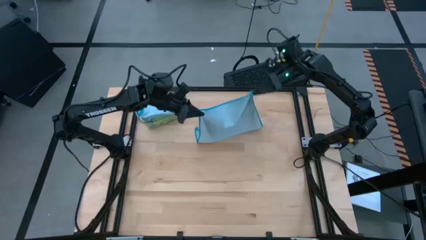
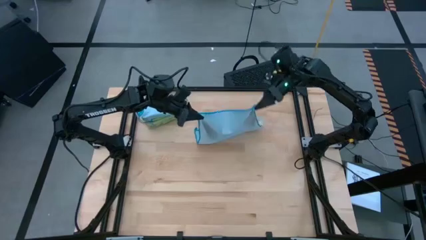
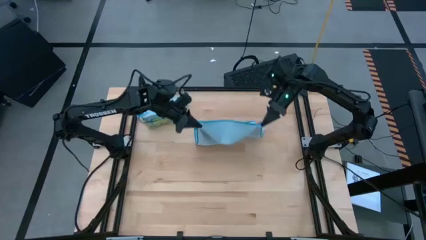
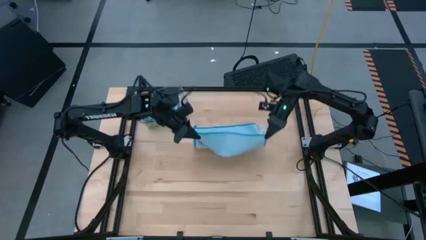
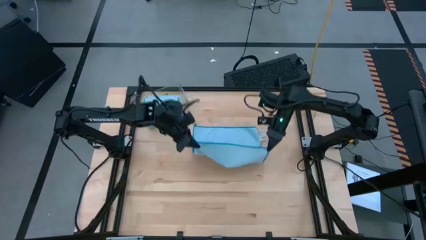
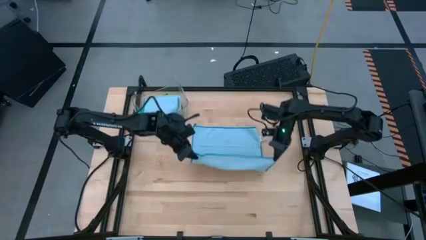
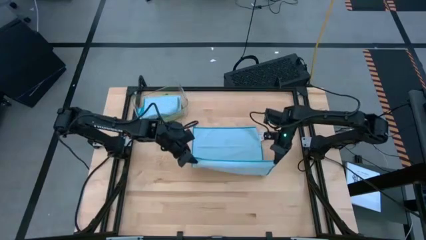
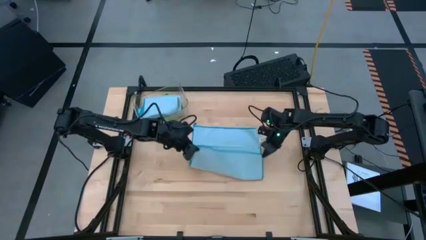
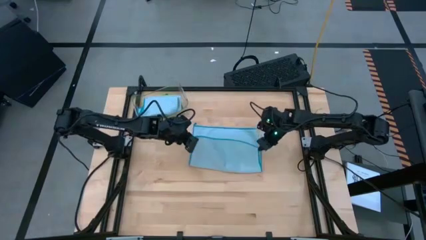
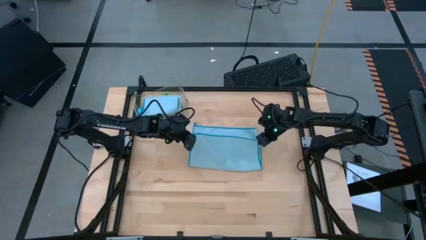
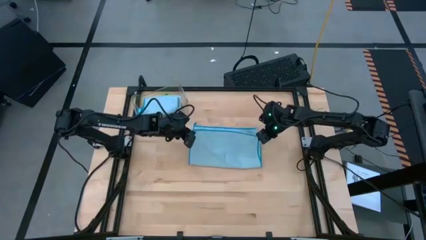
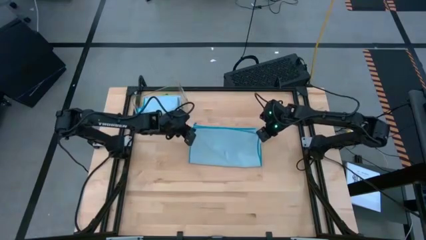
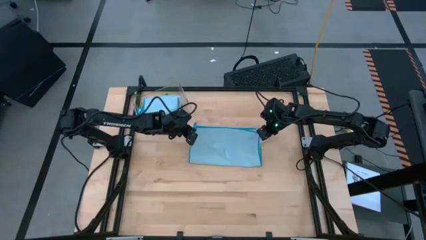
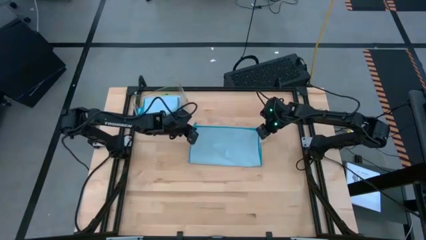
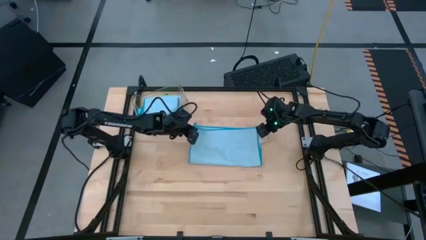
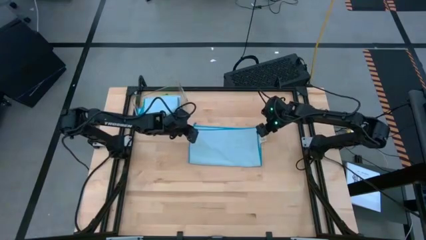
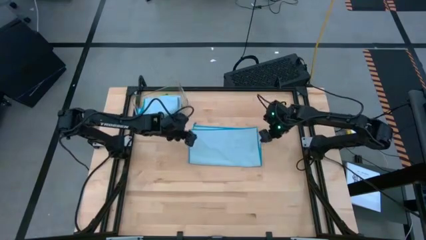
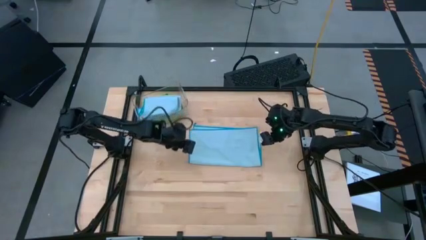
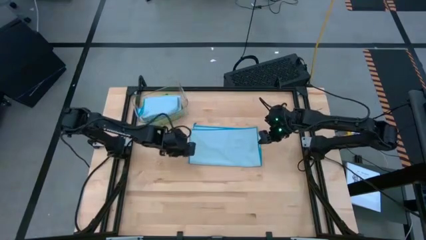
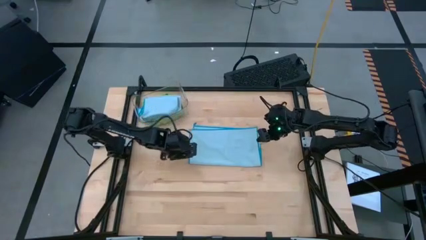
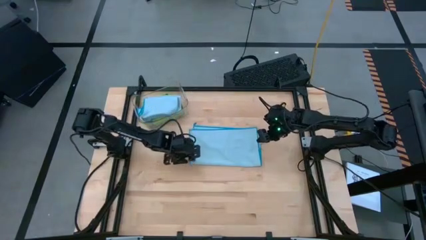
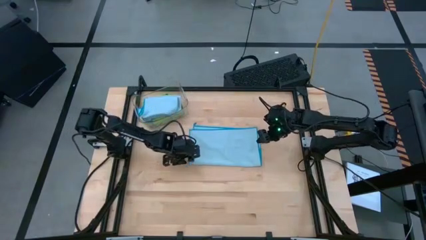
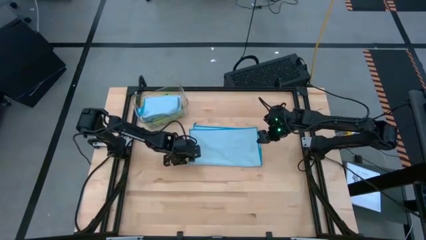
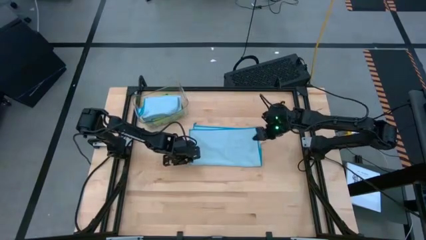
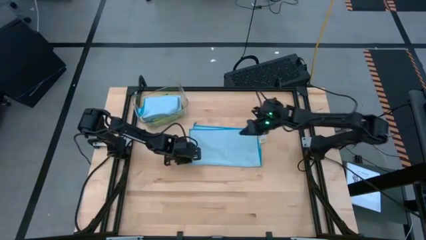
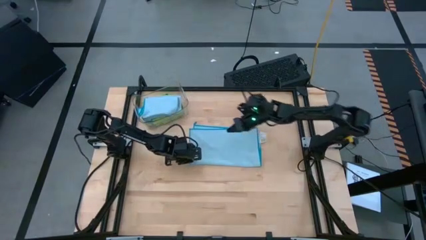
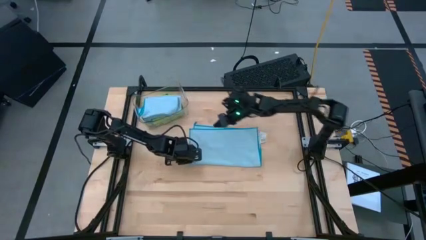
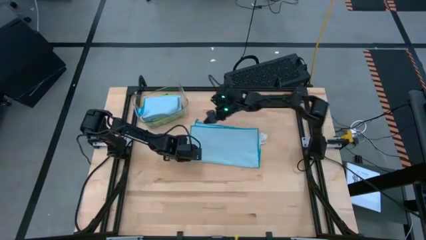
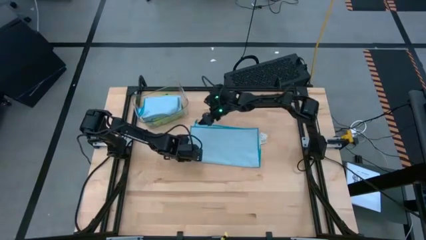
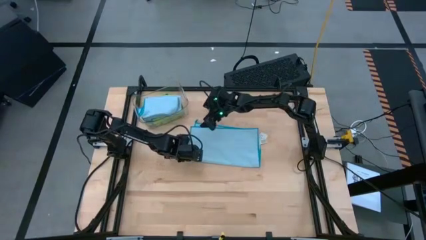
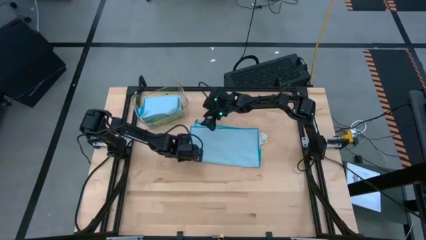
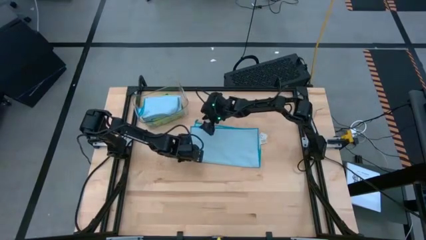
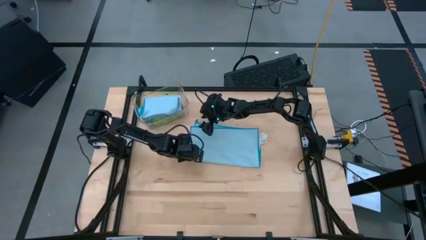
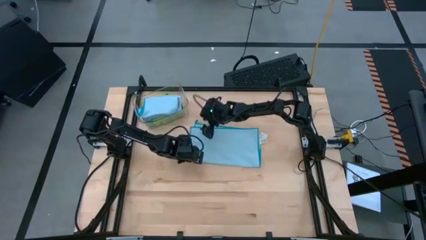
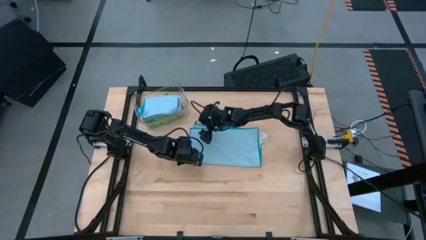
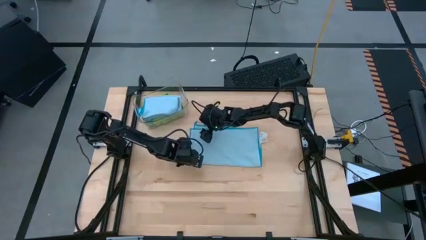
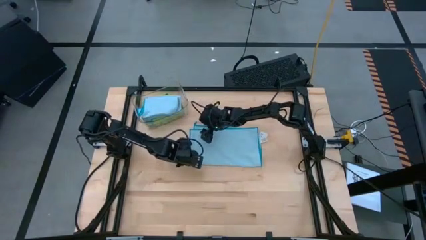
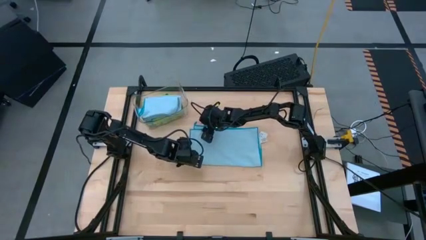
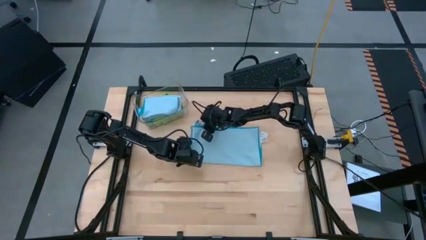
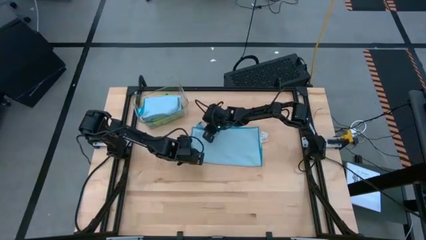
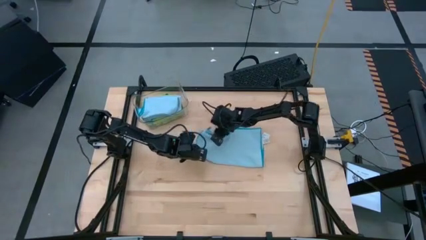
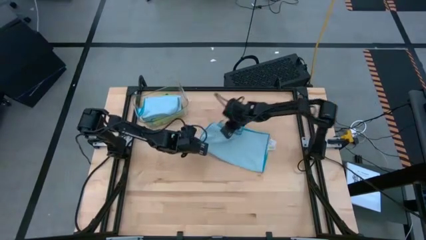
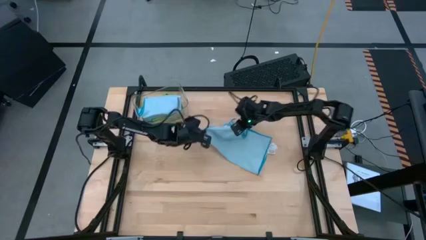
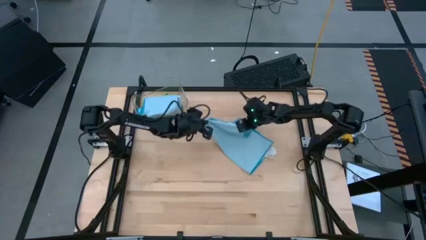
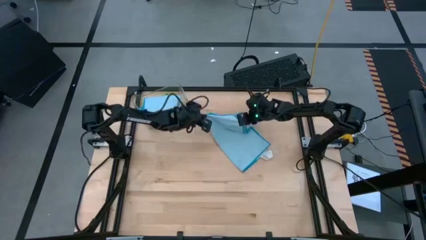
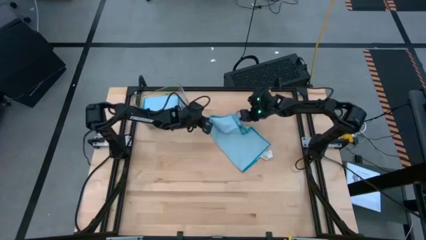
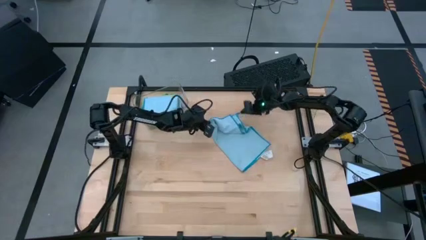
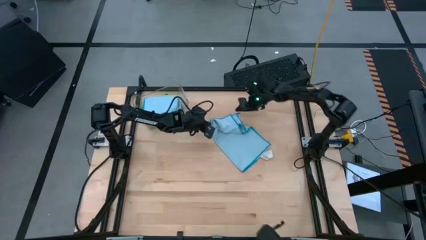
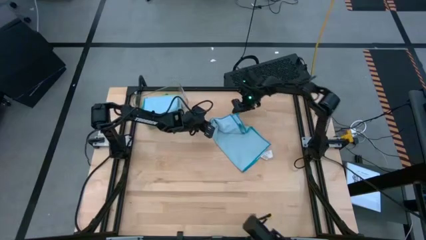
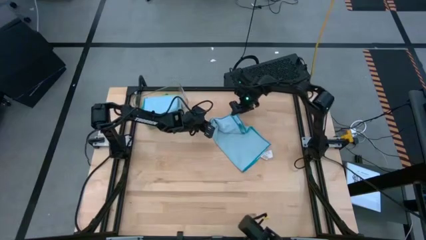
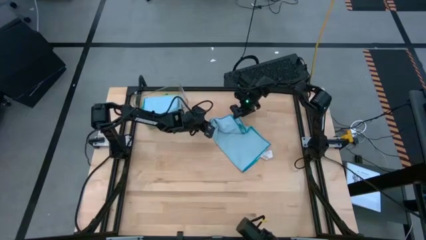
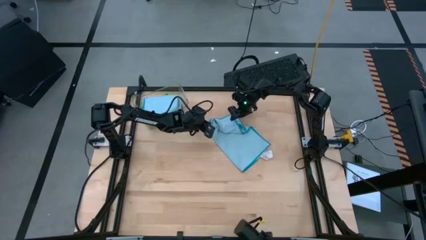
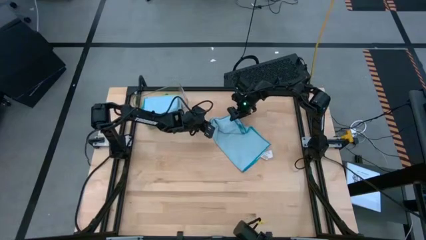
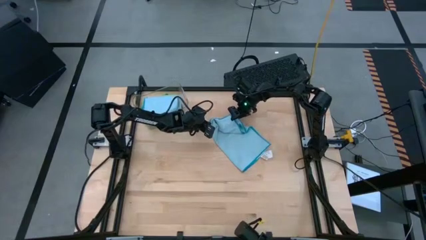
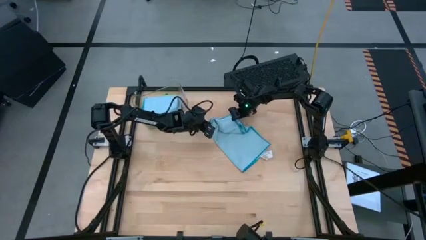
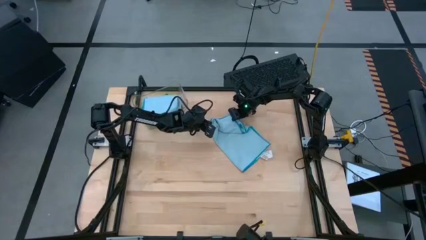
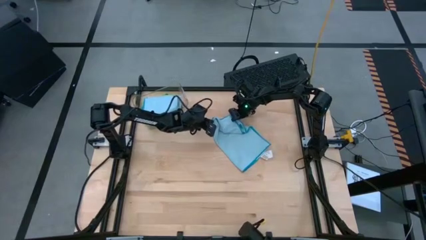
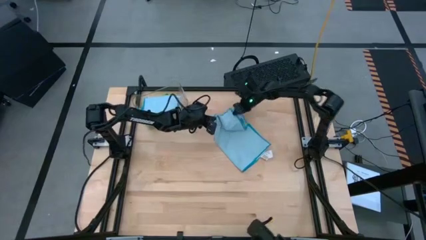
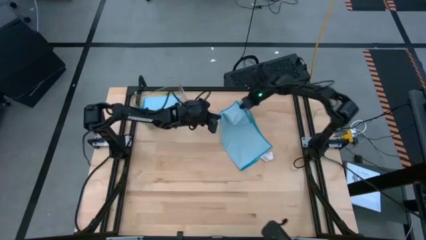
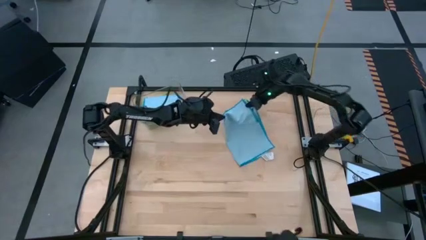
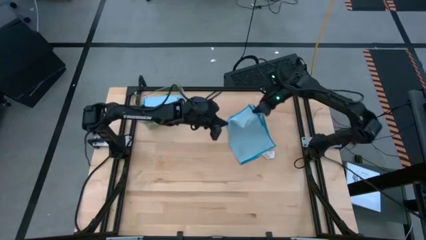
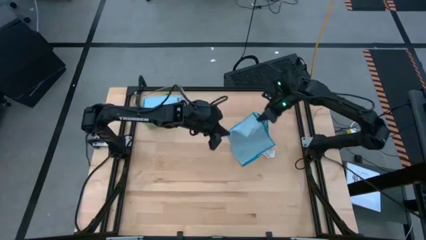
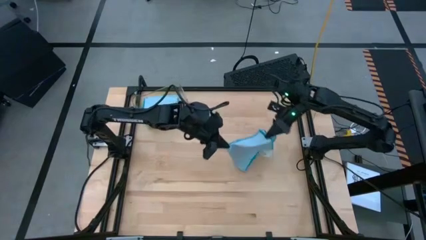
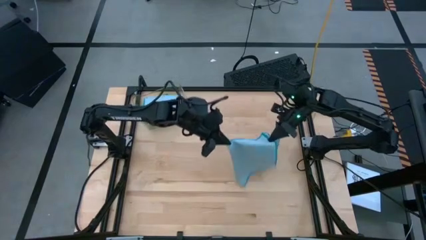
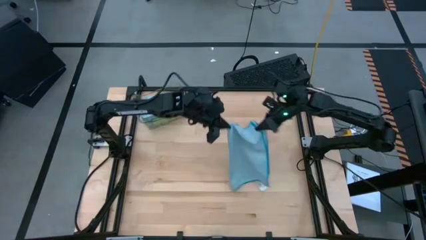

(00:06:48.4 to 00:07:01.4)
Task: Fold microfiber towels
Fold the blue microfiber cloth

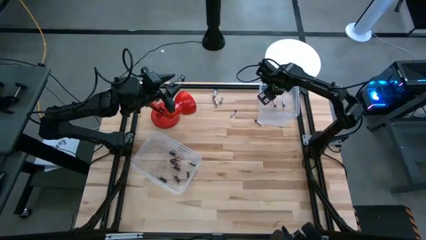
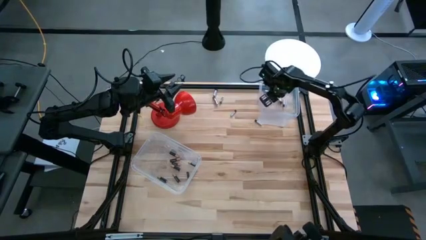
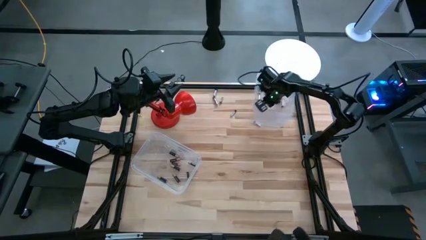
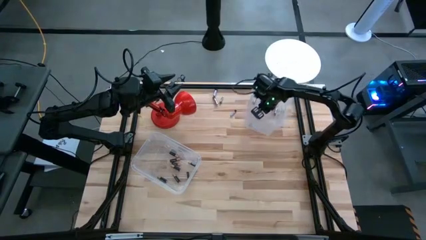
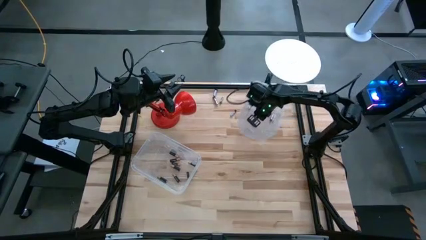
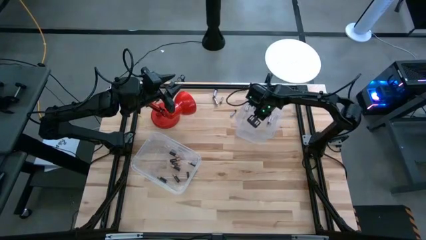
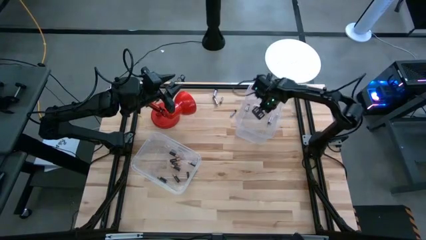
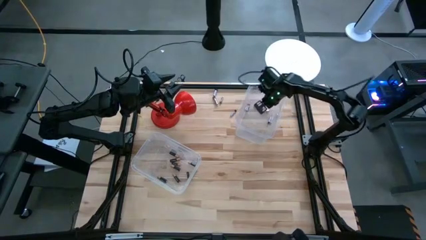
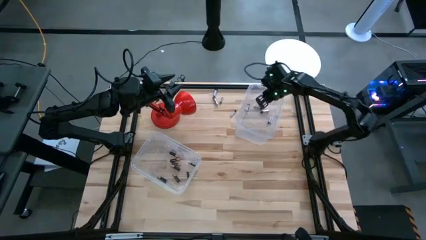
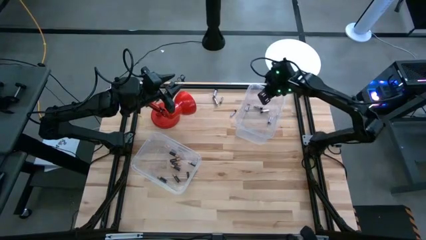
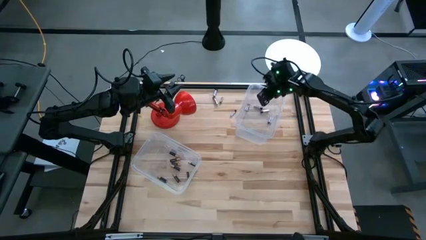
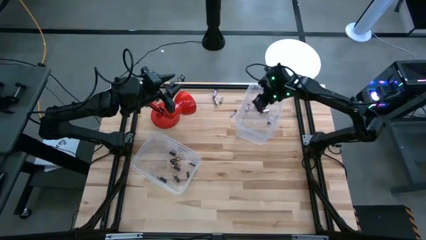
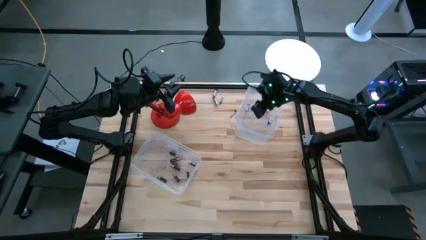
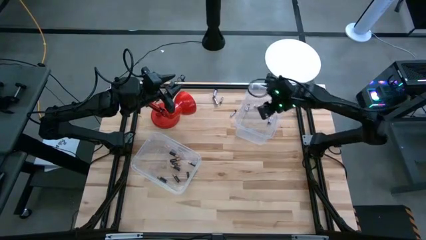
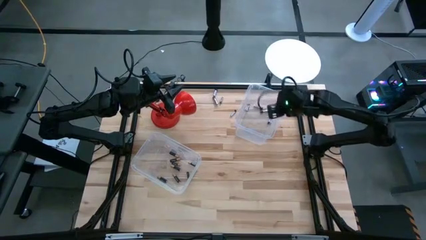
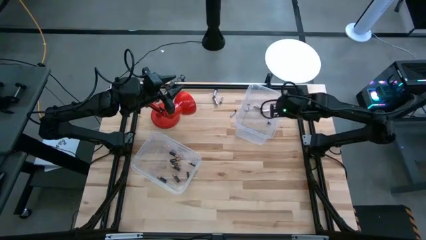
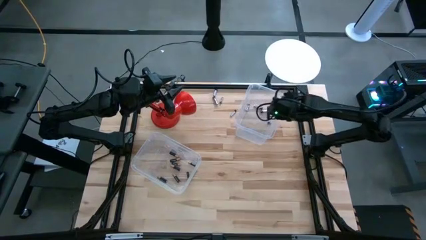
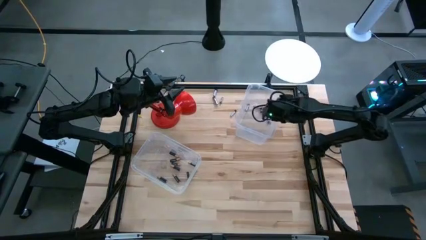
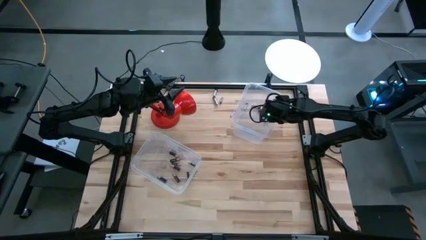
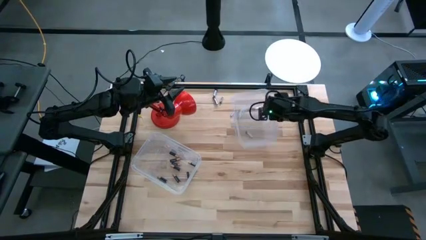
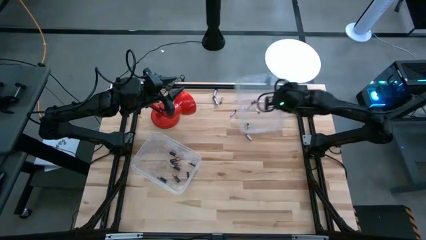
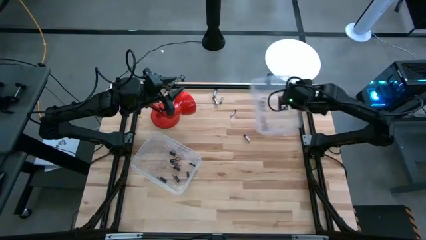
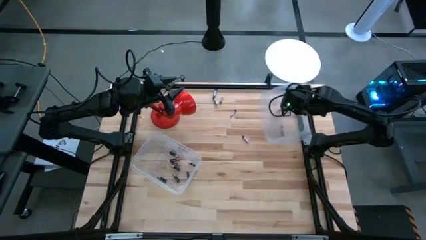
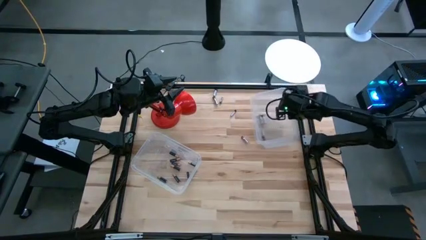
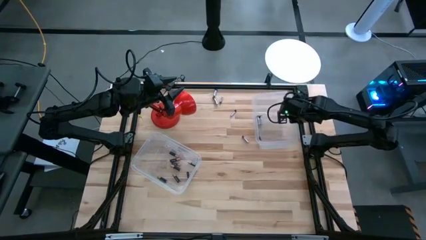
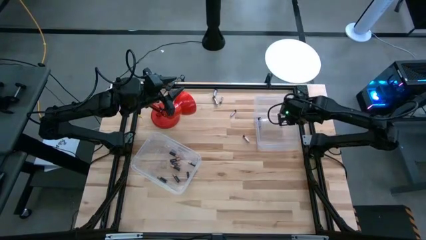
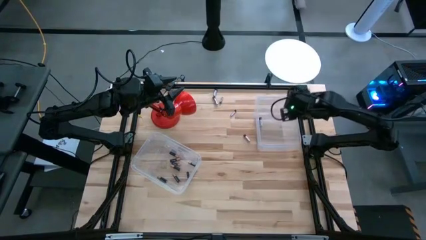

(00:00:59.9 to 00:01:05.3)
Task: Sort batteries
Adjust the top transparent bin
